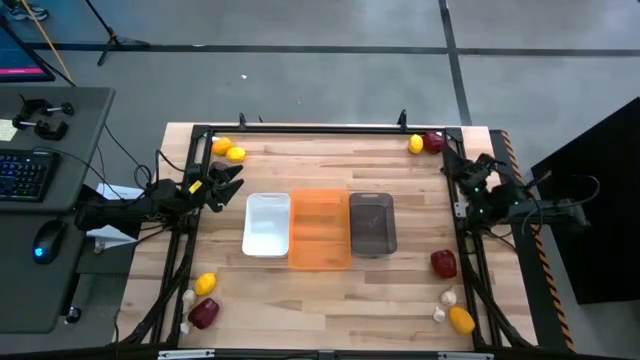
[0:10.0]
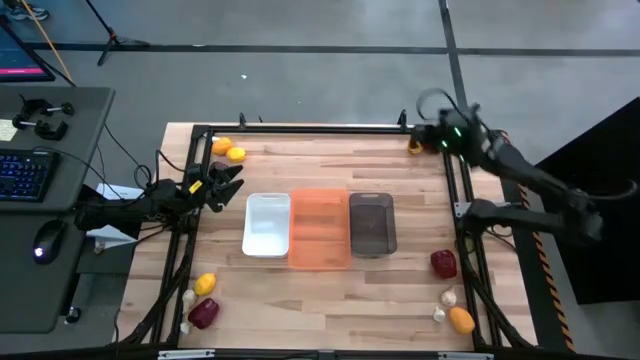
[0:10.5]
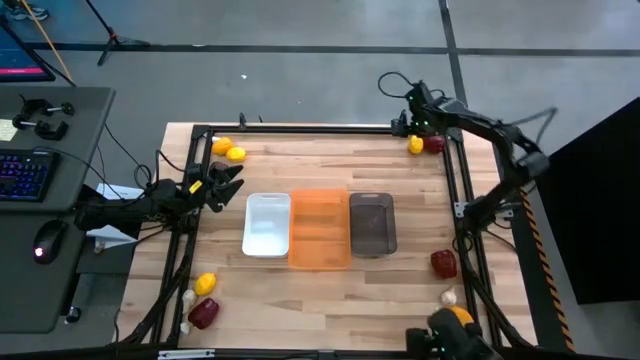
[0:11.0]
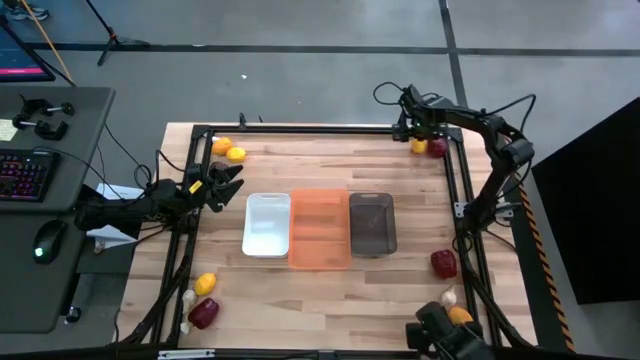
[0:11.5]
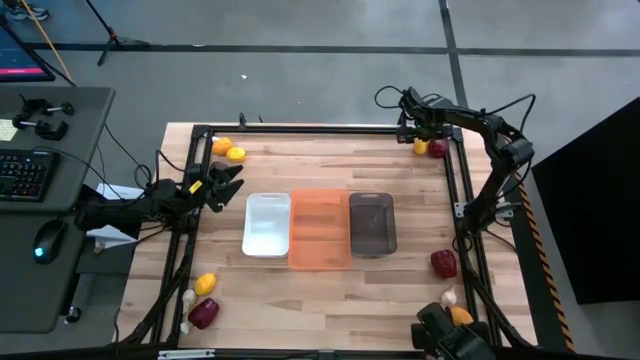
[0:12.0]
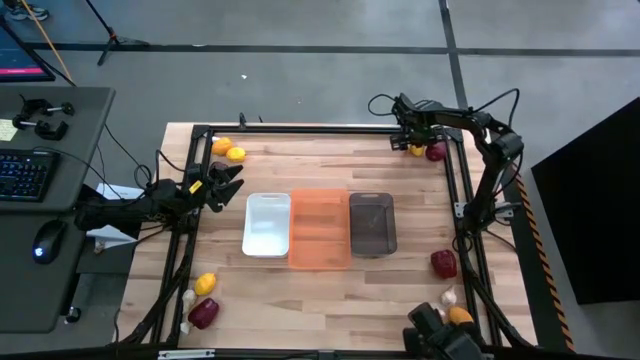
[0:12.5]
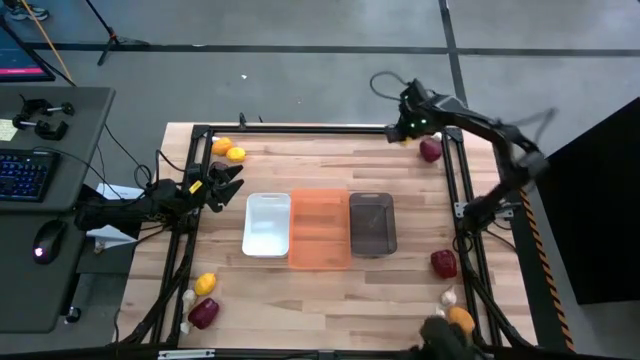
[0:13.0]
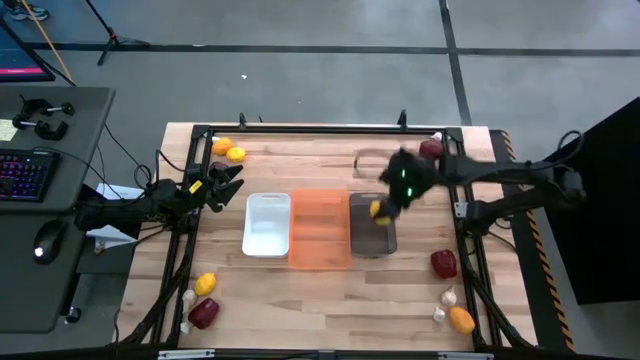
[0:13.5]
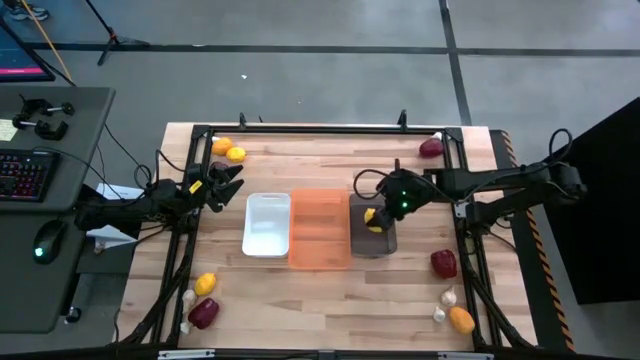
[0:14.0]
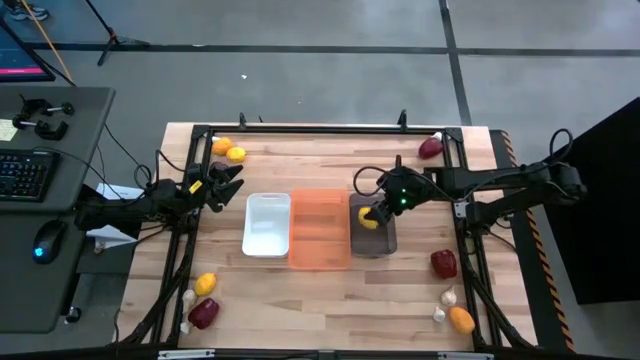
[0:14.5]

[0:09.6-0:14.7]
Task: Sort produce into baskets
Put the yellow lemon into the black bin

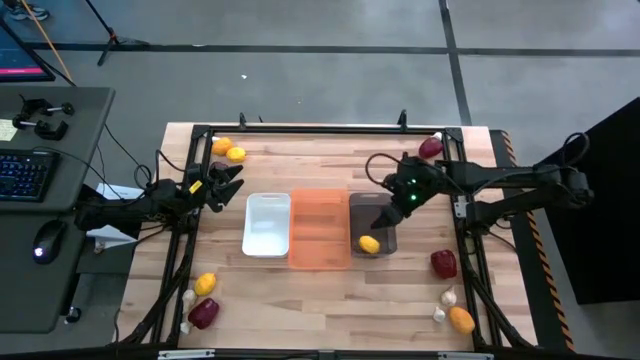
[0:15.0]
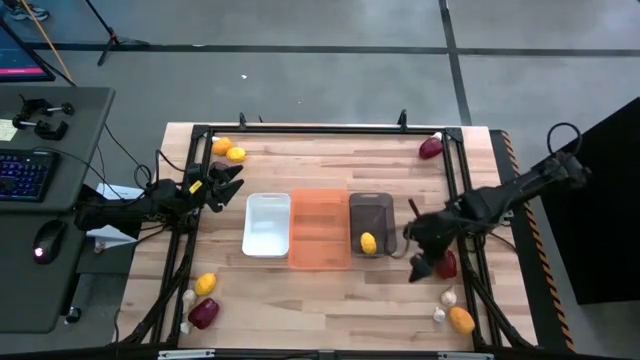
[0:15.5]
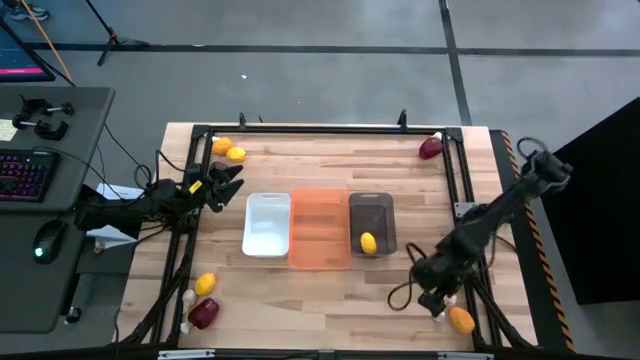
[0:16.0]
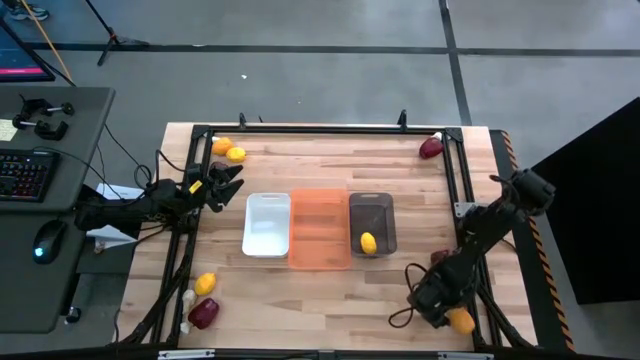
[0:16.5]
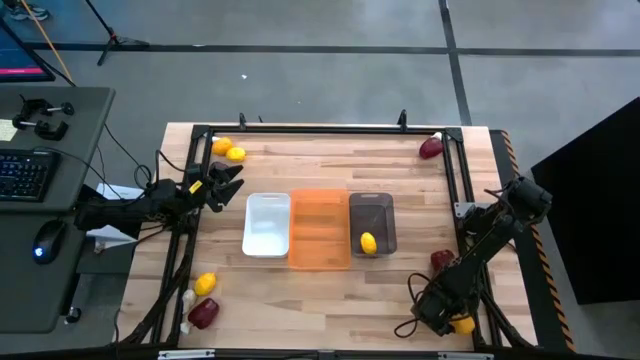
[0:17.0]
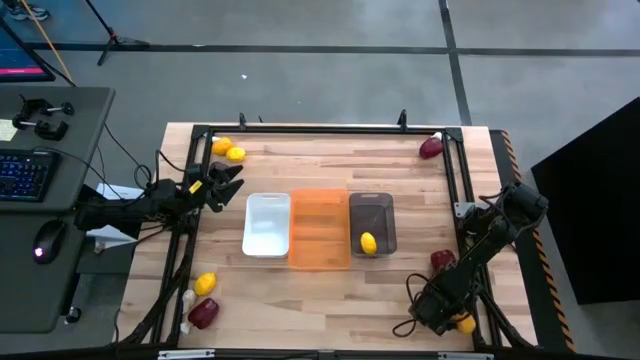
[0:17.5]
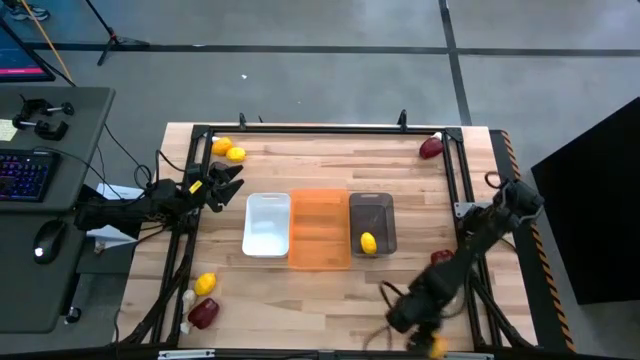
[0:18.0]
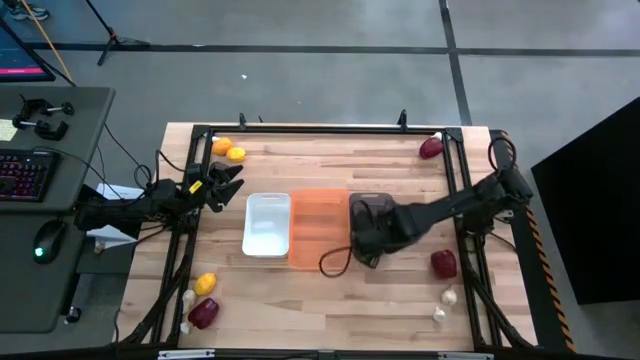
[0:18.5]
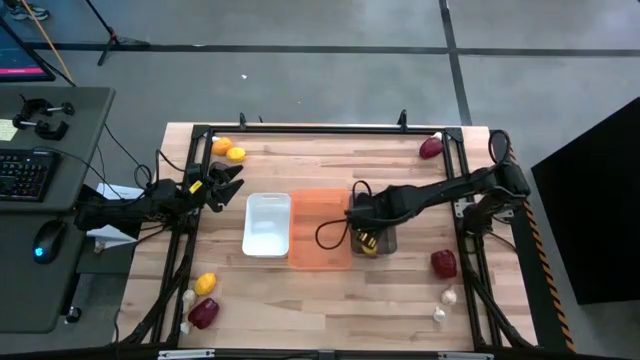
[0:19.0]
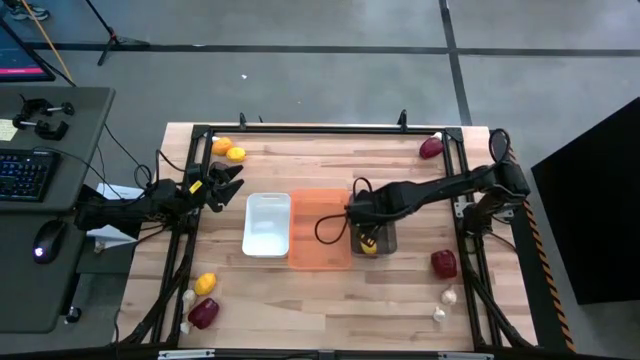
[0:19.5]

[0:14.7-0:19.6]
Put the yellow lemon into the black bin

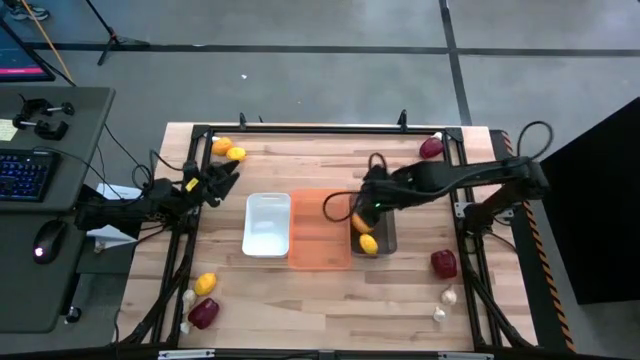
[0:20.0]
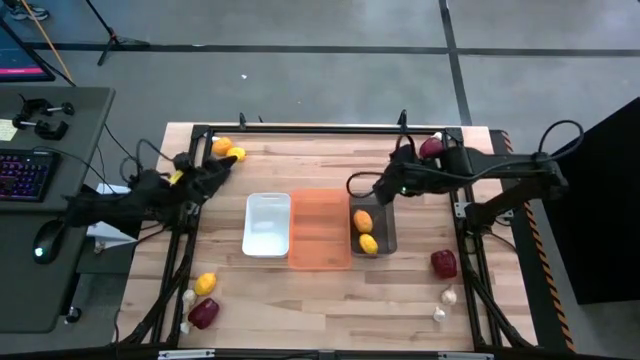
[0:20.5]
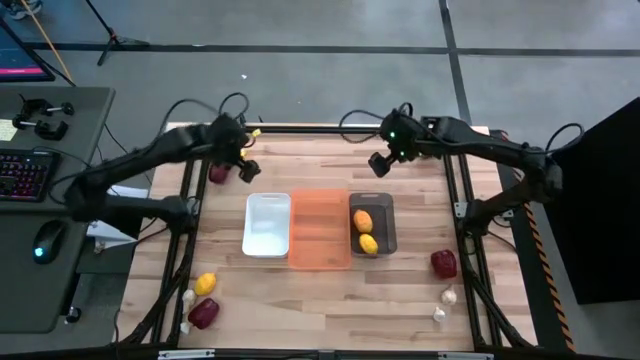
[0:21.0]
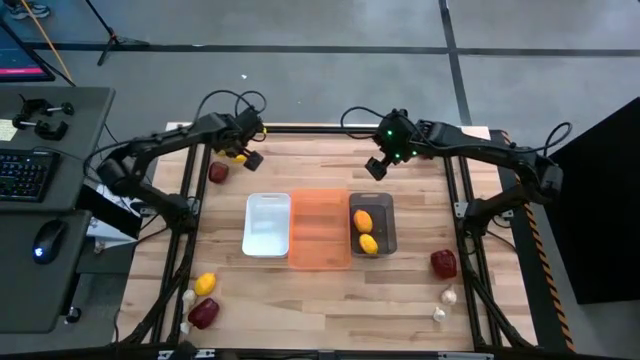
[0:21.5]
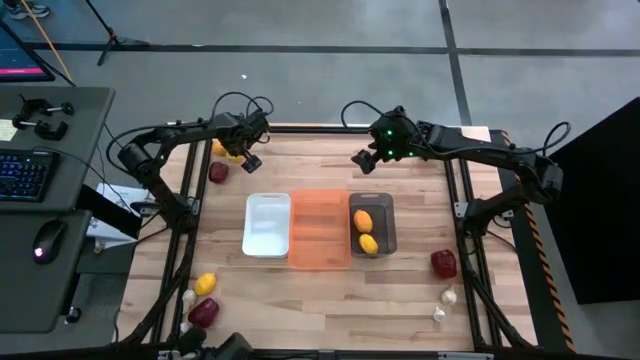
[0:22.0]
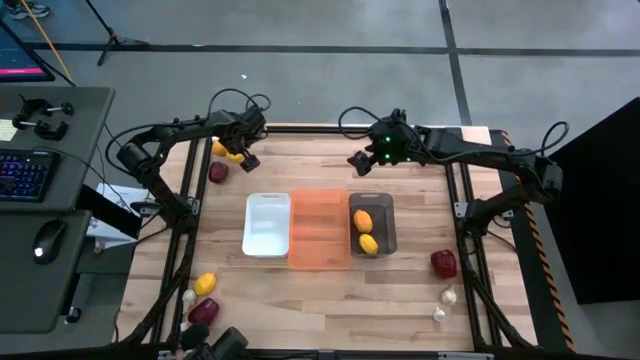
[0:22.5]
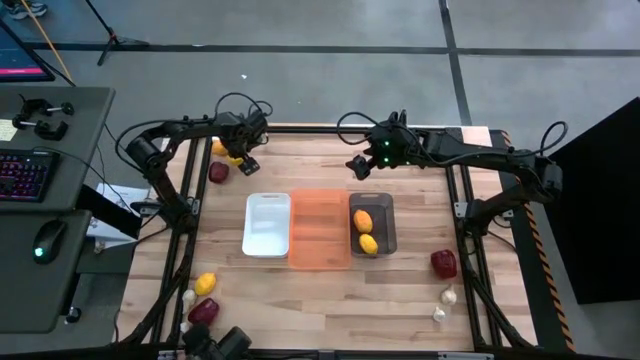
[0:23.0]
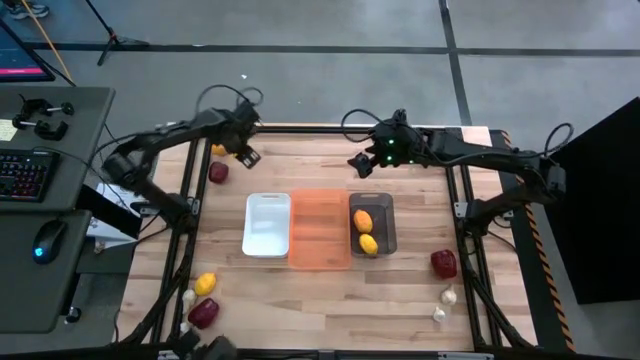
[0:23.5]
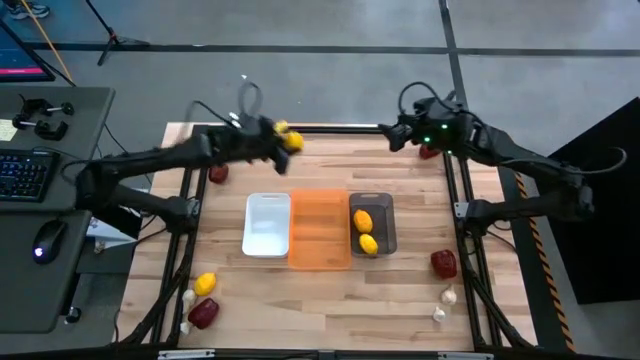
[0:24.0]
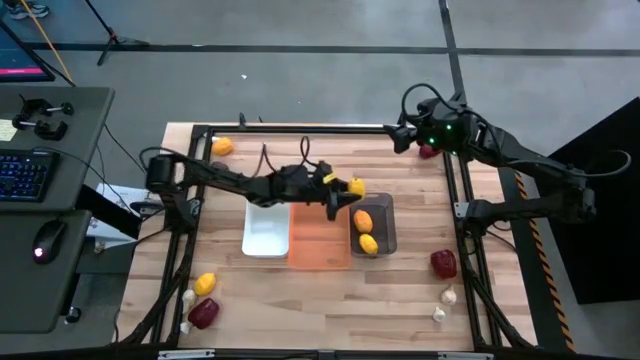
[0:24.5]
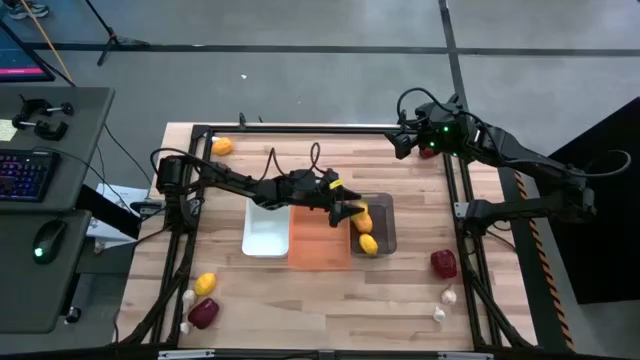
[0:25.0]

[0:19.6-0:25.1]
Put the yellow lemon into the black bin

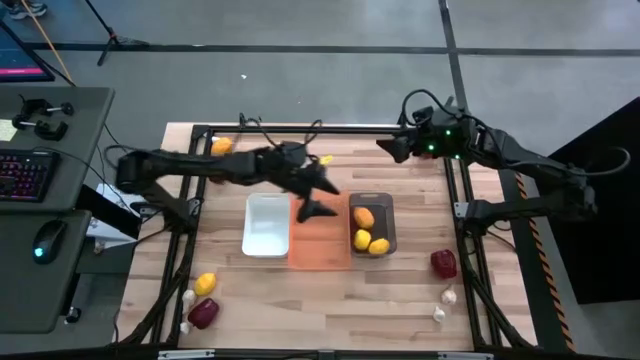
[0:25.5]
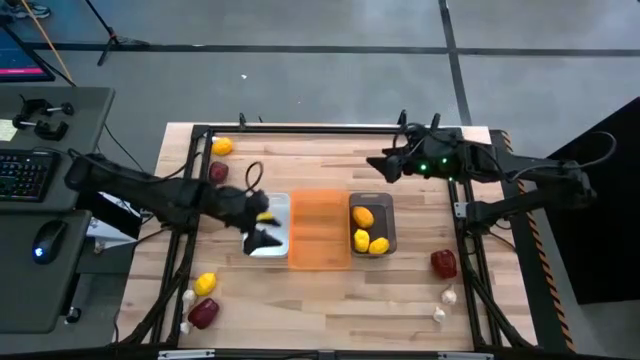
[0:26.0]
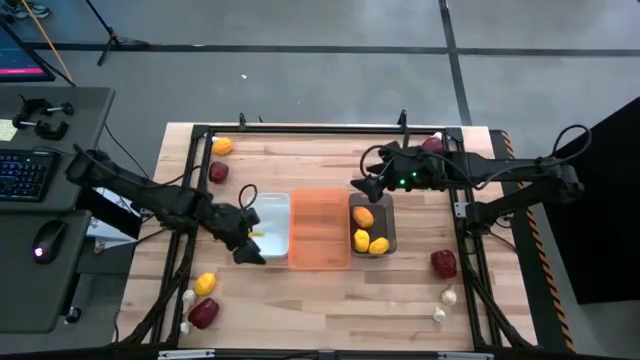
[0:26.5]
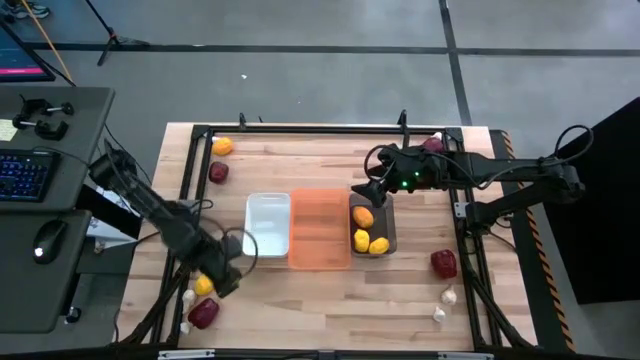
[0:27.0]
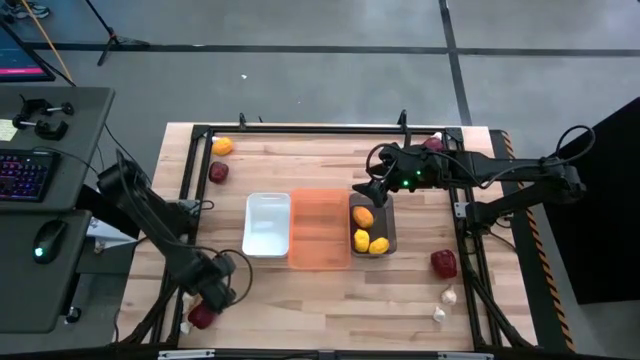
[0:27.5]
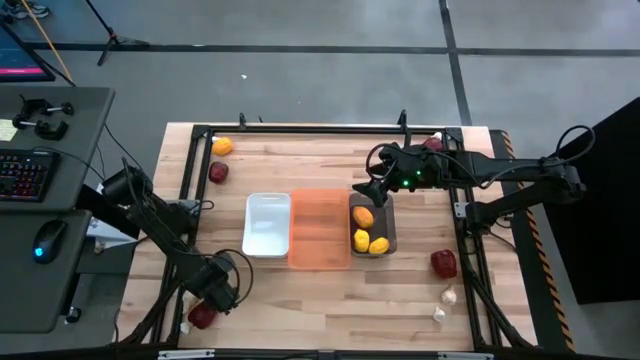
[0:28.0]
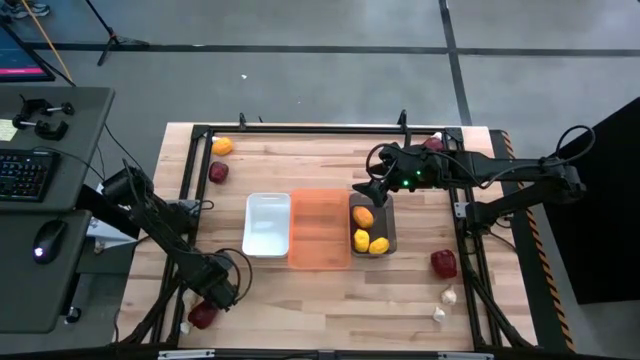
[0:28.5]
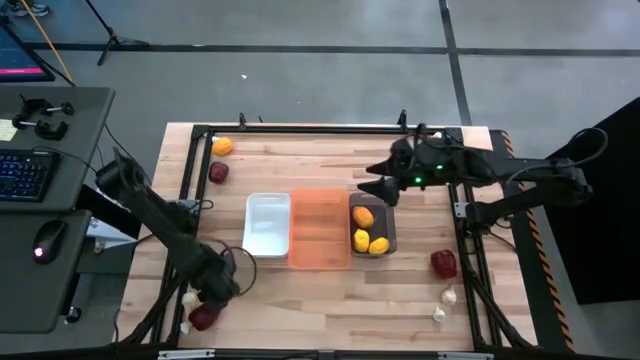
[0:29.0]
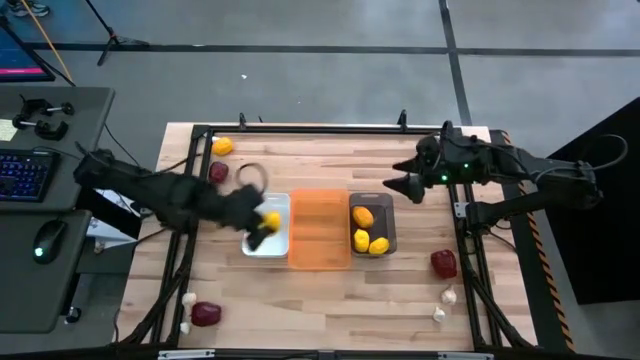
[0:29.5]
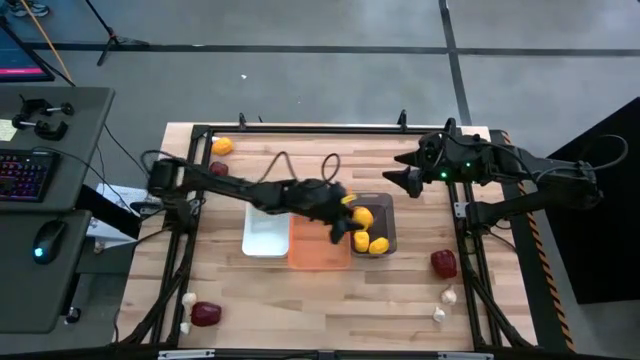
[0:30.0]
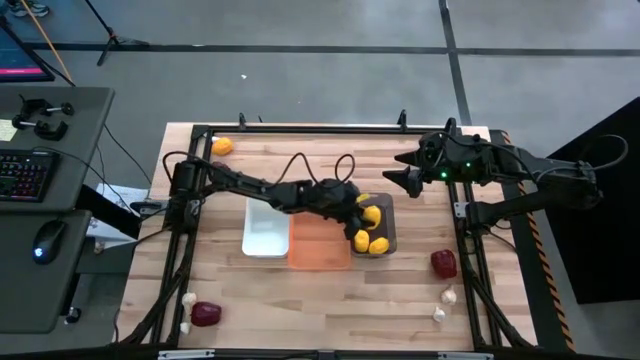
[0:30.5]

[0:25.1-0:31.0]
Put the yellow lemon into the black bin
